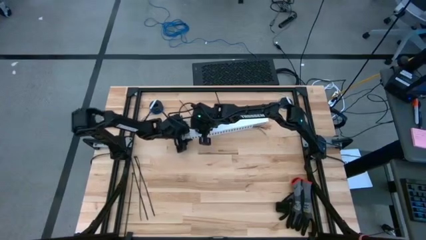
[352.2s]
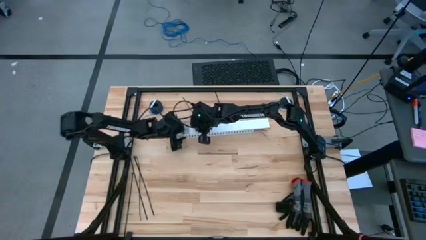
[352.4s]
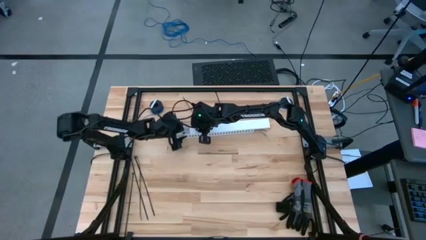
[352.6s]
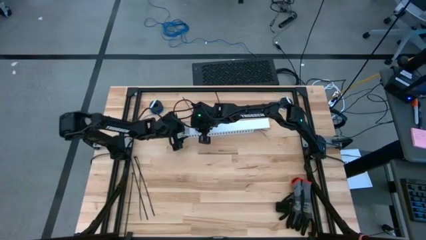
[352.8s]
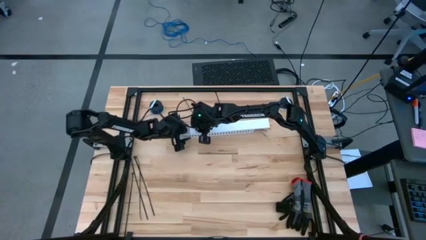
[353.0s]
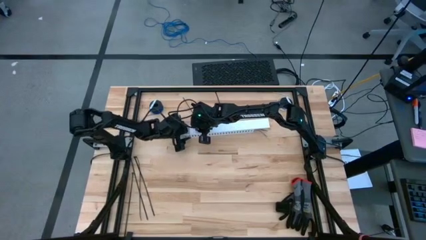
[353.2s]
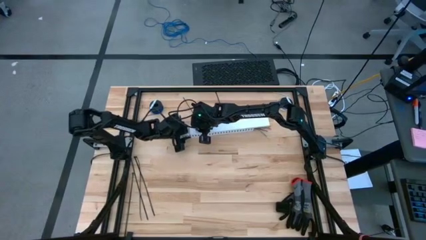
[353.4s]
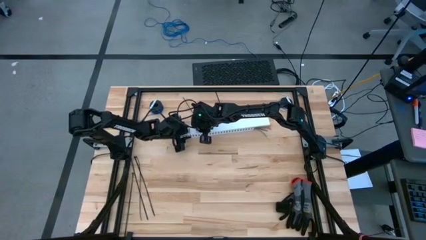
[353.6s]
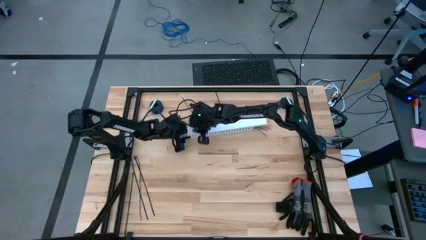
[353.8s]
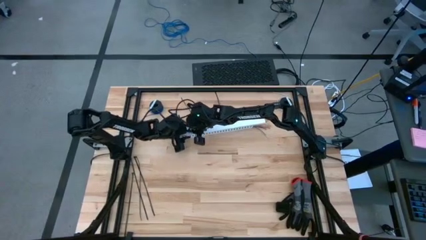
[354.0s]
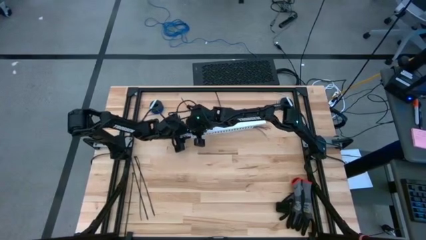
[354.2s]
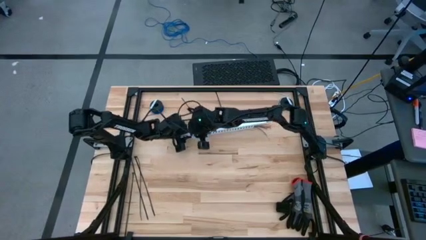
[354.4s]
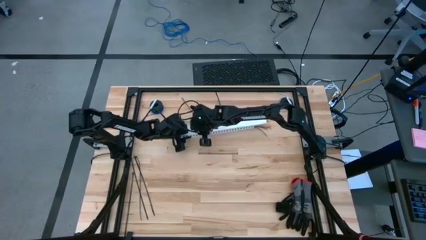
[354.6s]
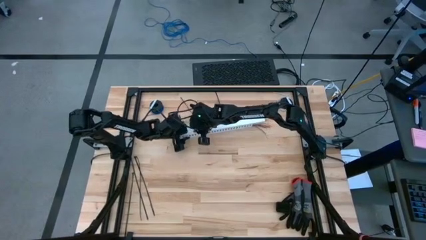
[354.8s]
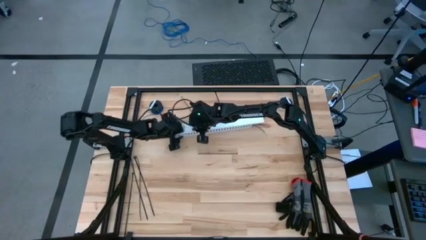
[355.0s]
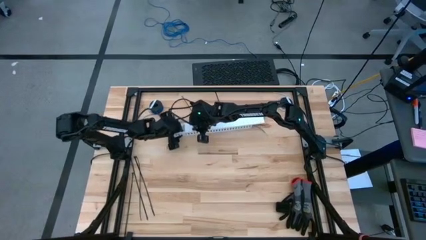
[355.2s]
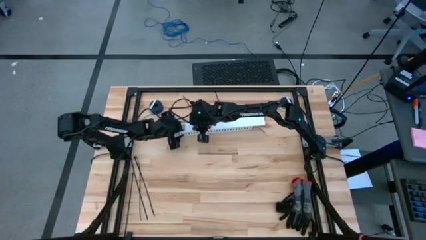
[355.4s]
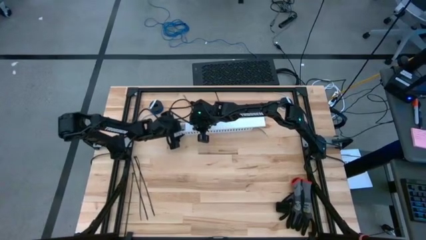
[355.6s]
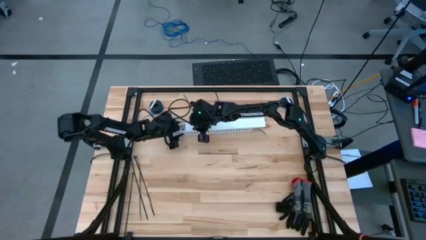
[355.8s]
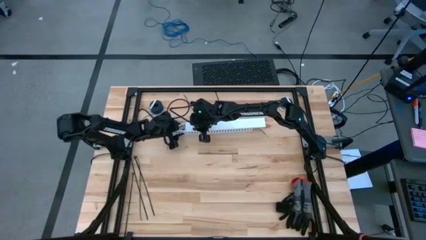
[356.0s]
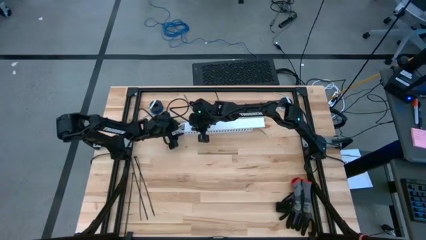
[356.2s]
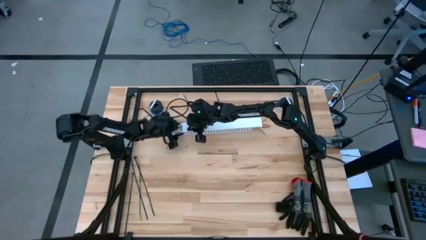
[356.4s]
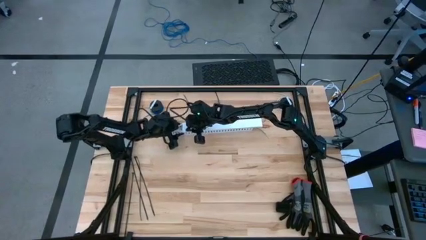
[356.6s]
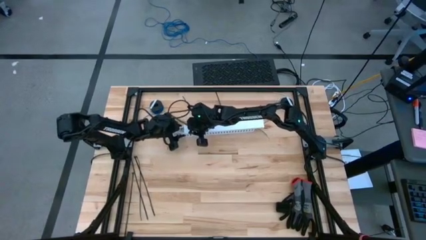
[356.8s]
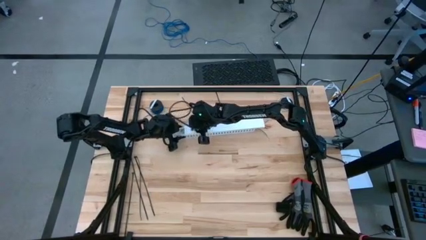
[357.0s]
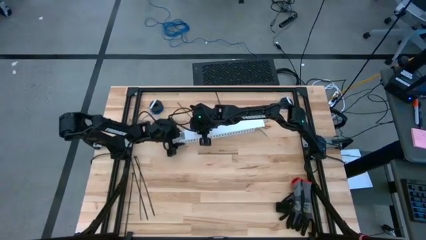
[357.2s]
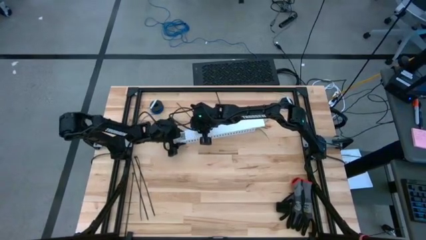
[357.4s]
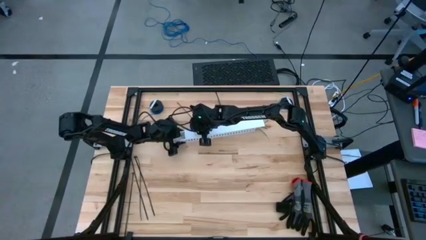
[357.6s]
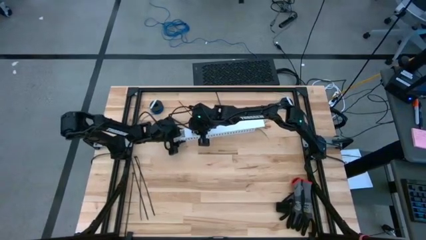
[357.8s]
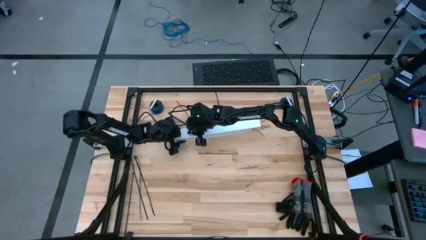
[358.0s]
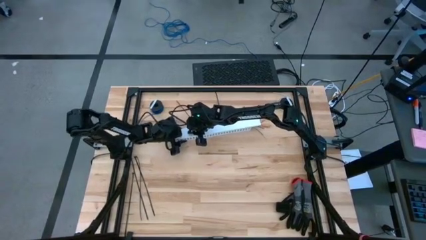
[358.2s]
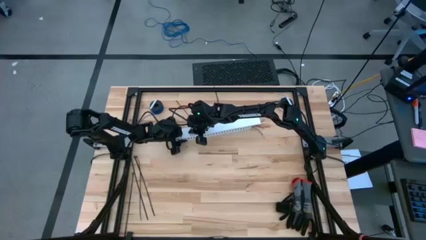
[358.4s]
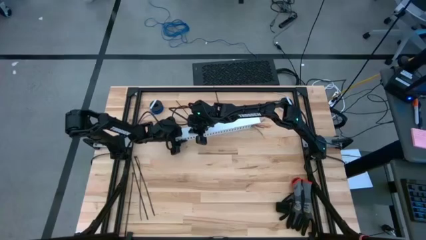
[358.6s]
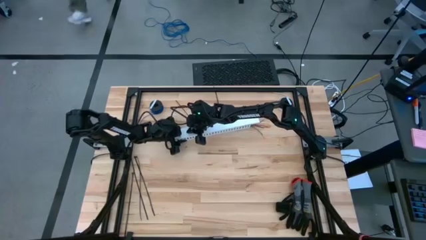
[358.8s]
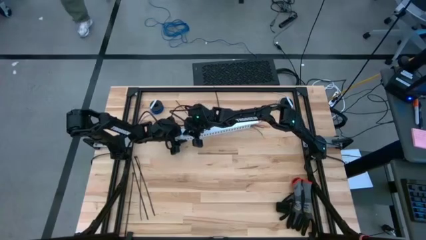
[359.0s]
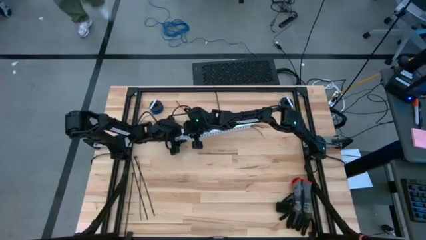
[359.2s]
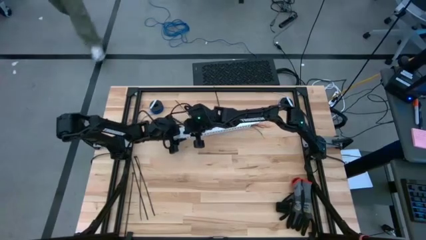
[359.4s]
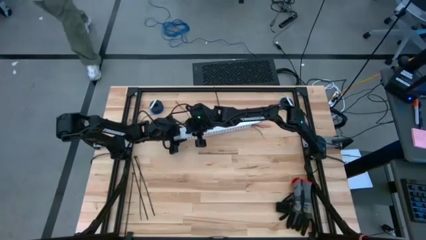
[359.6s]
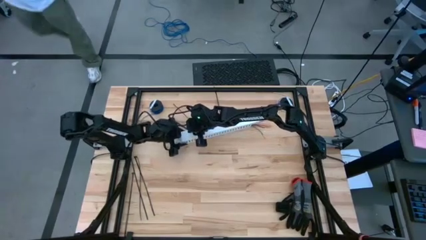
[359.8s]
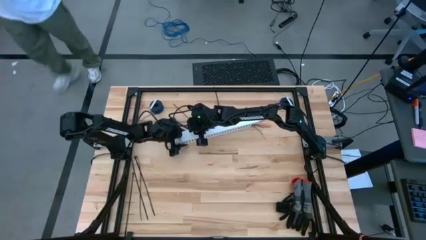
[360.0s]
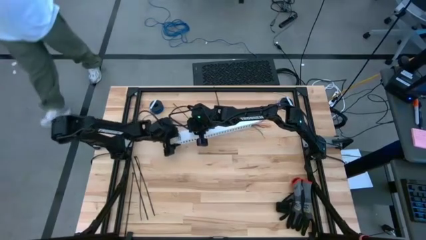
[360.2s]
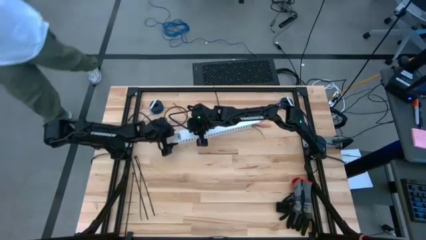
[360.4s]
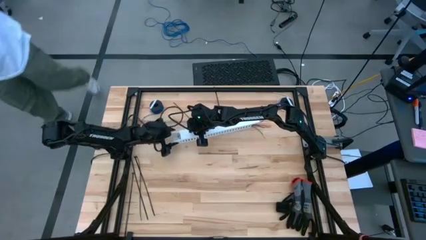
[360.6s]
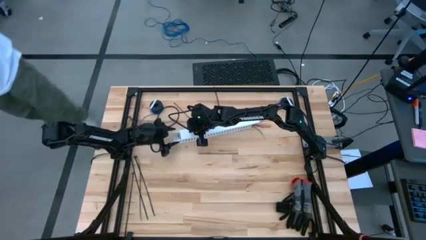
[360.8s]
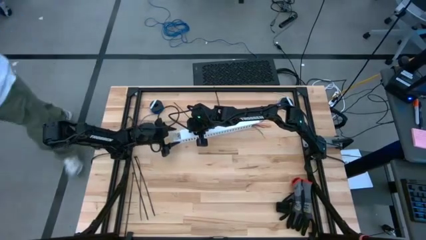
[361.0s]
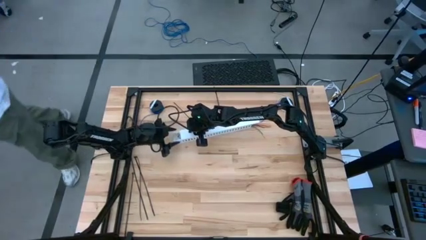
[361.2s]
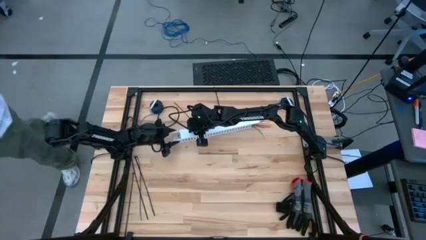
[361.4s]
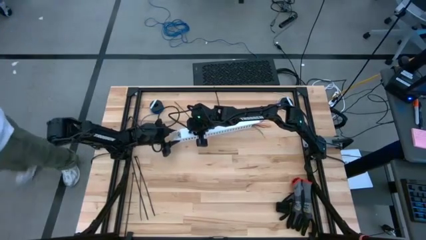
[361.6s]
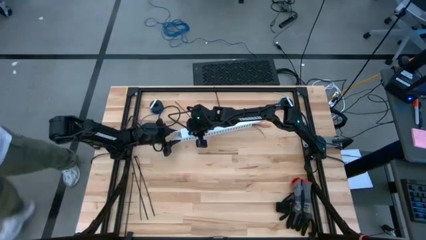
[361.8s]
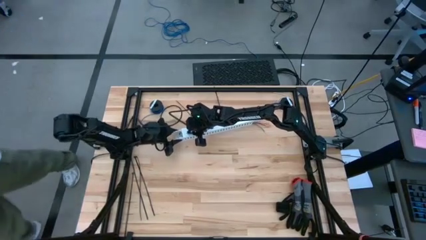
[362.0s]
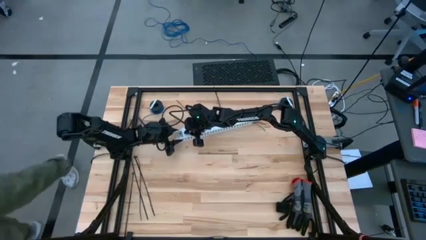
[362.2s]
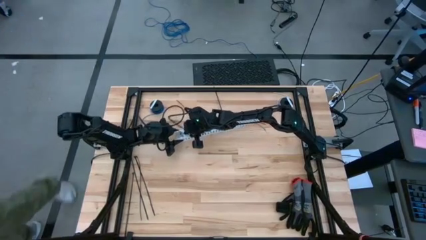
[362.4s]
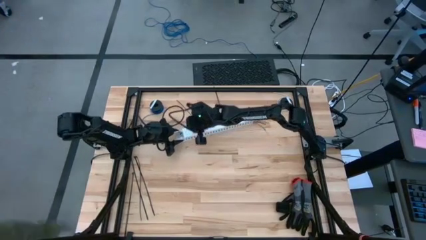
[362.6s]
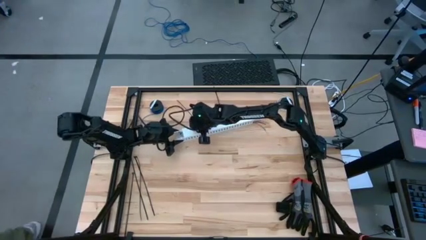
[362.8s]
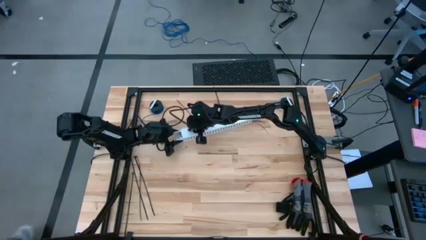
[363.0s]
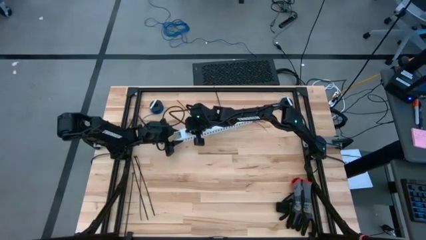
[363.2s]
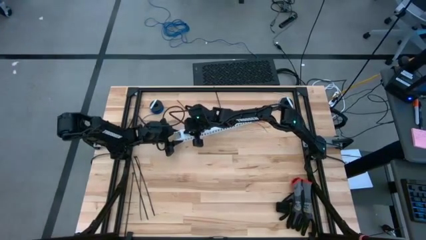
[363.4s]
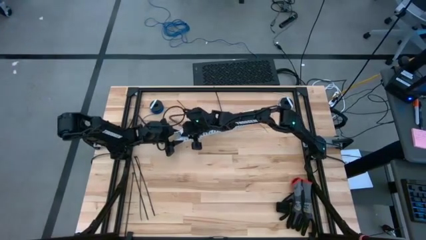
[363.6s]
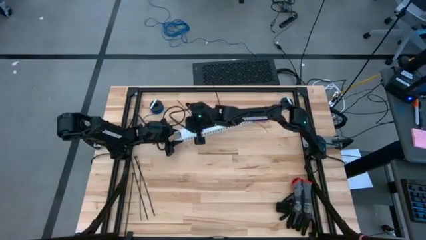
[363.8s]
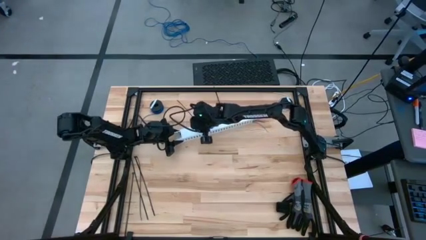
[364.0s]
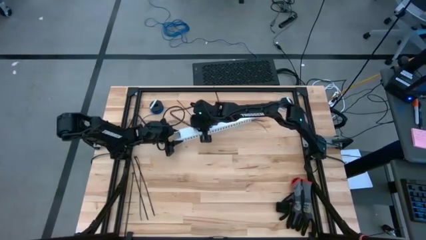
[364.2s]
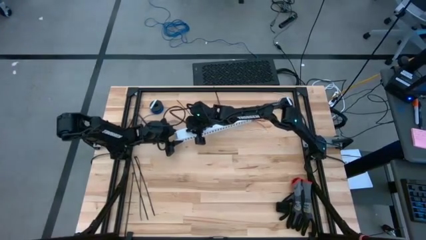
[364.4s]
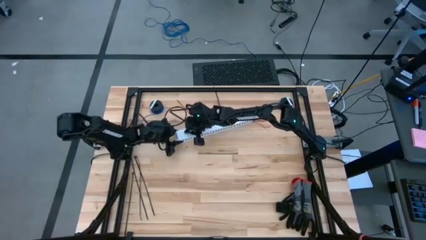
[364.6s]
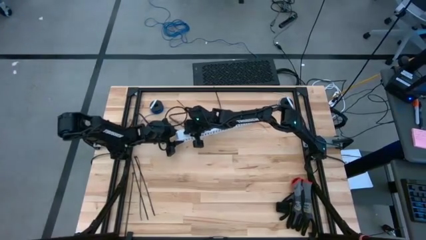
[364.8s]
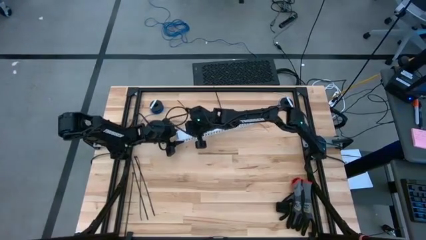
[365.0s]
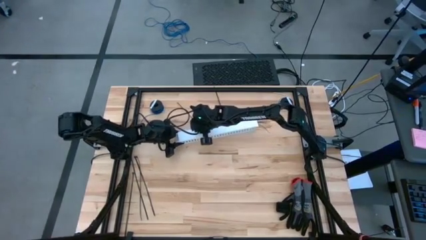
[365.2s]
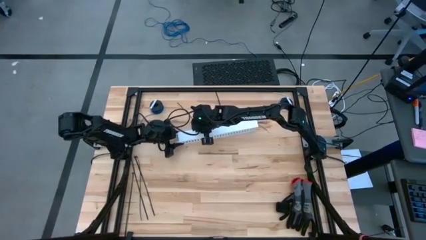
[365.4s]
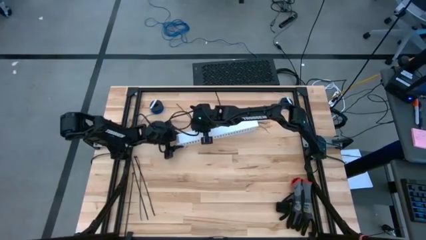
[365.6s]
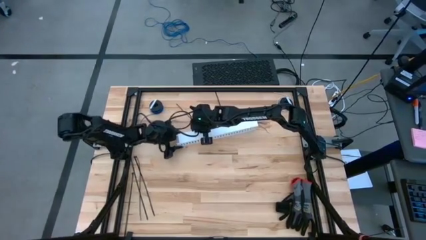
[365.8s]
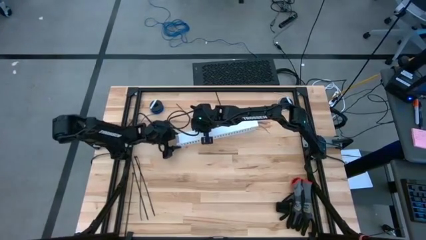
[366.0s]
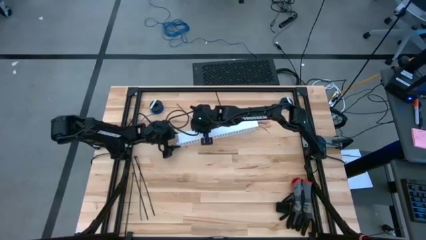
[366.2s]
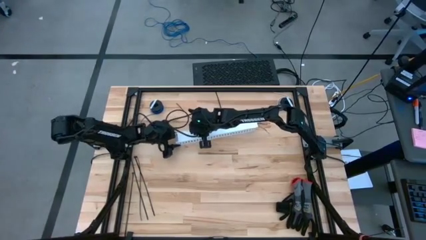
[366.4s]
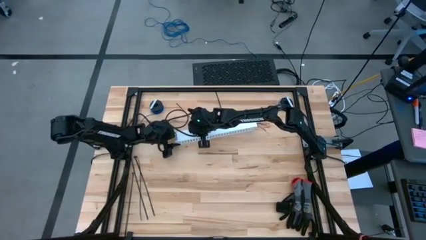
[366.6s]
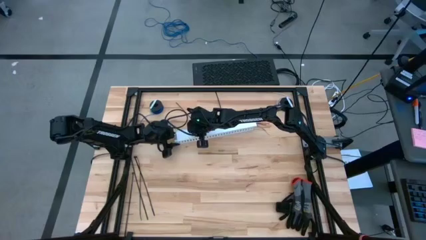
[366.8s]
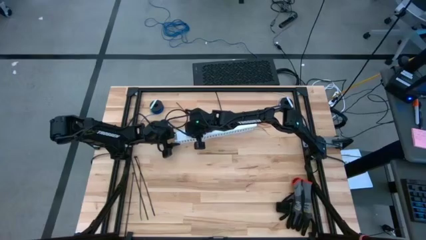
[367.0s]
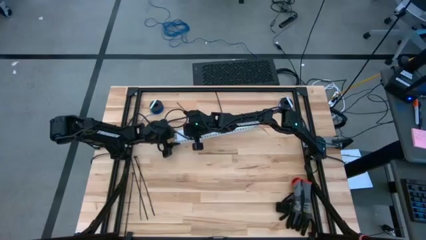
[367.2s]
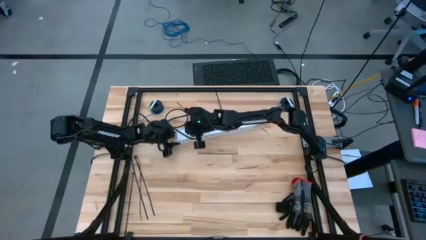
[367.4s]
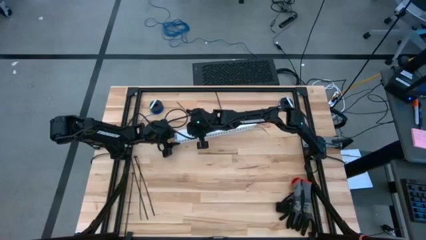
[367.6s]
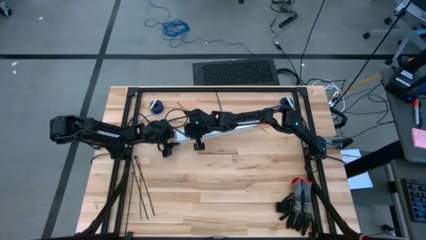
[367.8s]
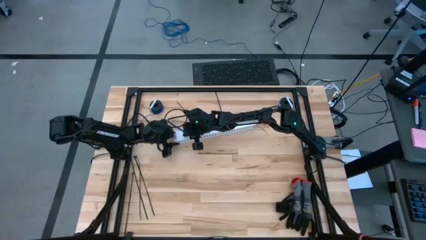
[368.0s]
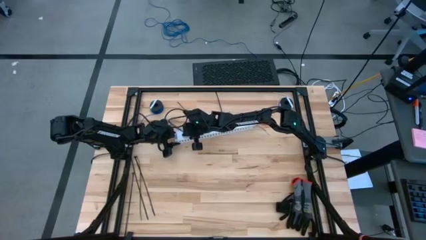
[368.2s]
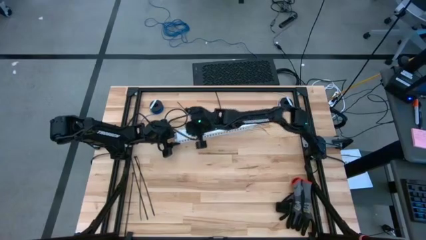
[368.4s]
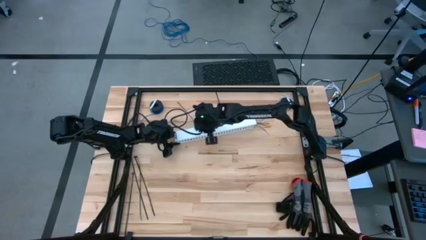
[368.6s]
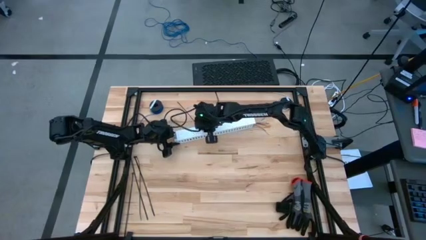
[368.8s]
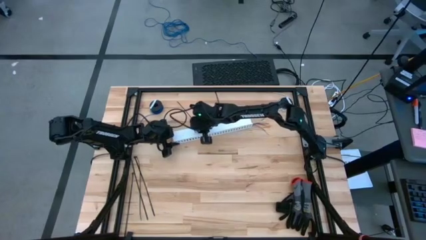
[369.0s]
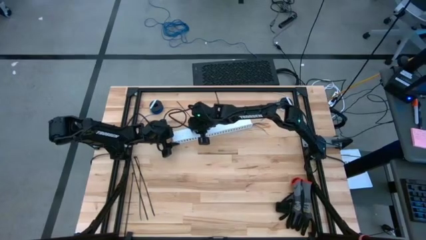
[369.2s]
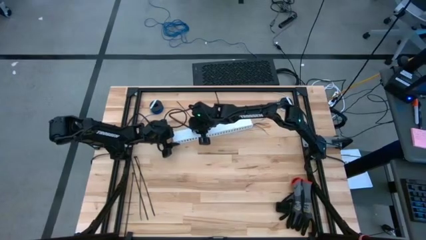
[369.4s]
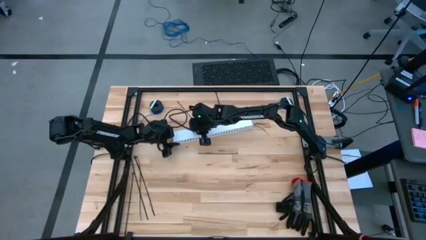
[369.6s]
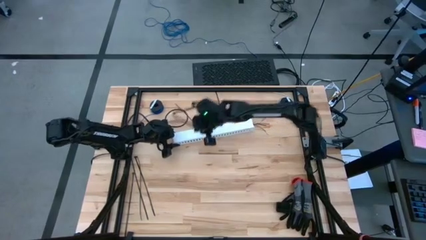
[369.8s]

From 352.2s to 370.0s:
Task: Ziptie cables
Close the white cable duct
